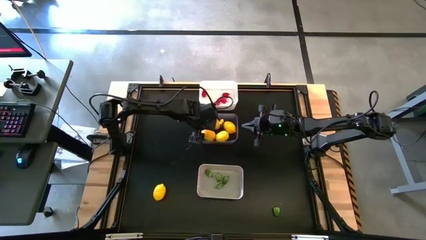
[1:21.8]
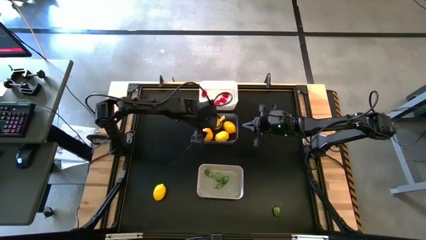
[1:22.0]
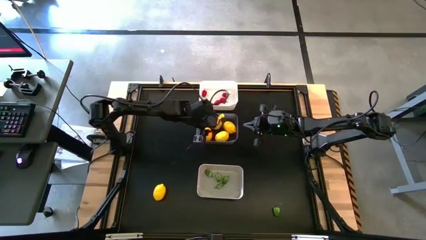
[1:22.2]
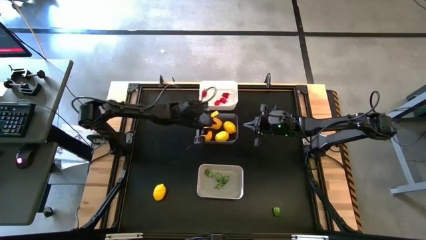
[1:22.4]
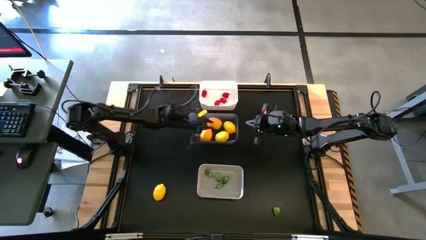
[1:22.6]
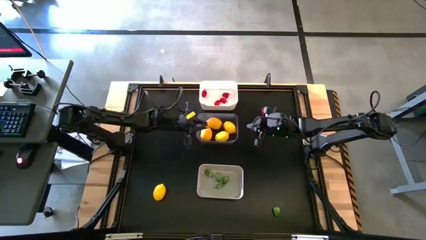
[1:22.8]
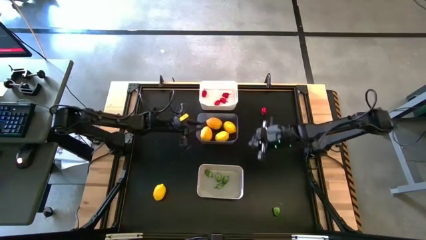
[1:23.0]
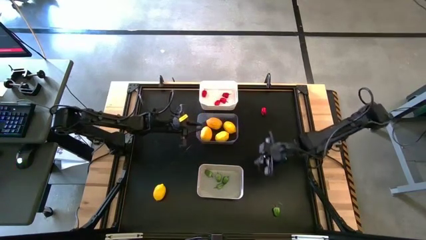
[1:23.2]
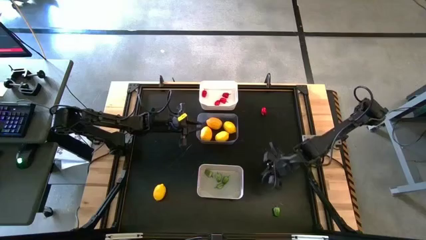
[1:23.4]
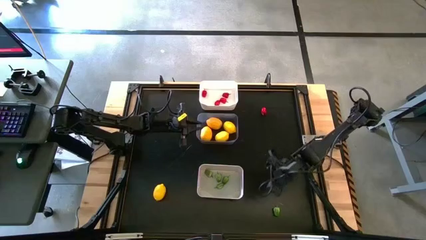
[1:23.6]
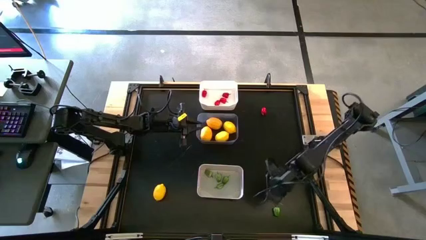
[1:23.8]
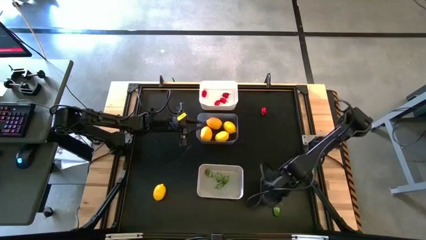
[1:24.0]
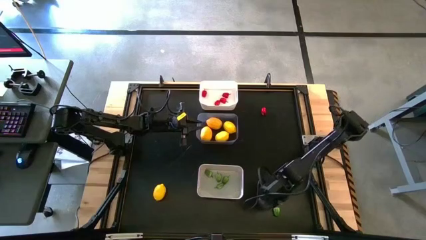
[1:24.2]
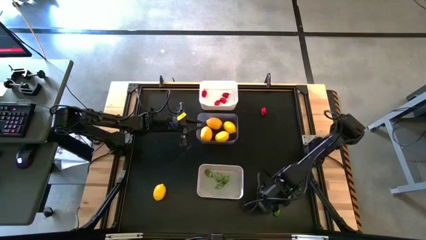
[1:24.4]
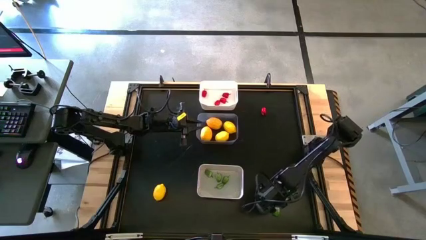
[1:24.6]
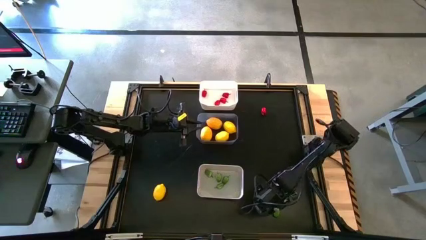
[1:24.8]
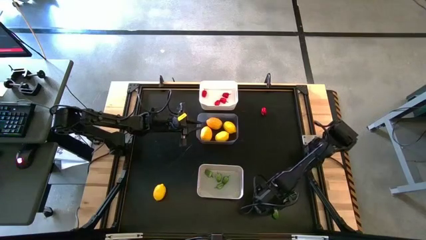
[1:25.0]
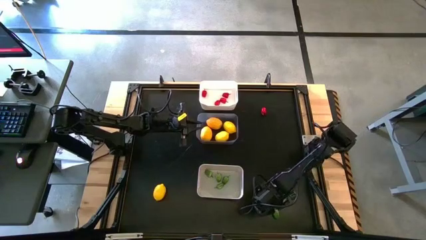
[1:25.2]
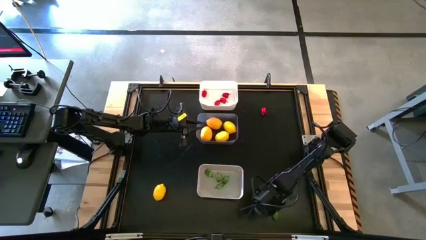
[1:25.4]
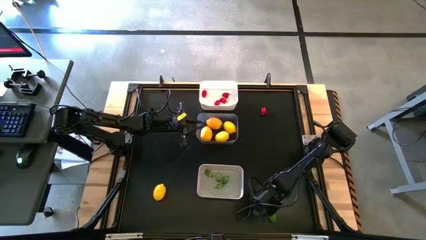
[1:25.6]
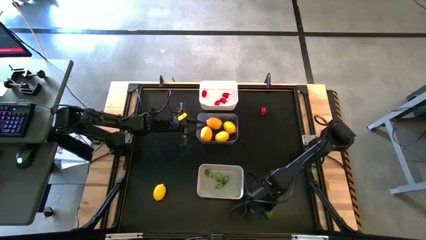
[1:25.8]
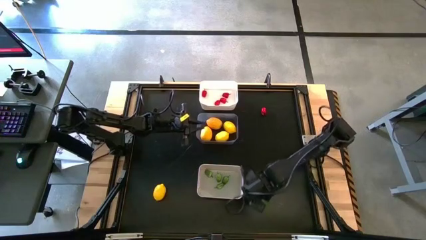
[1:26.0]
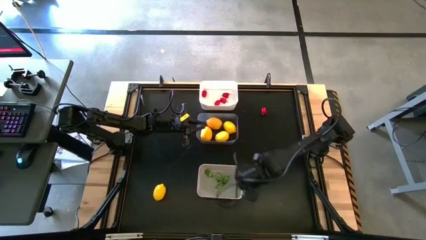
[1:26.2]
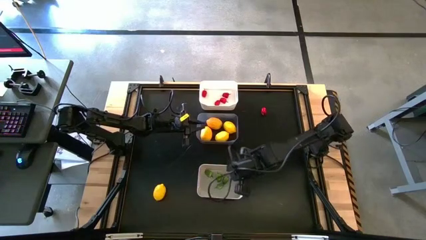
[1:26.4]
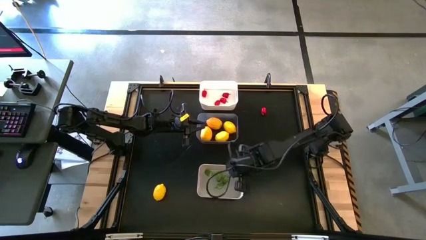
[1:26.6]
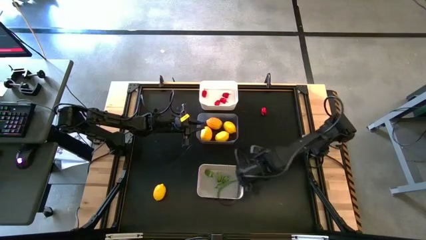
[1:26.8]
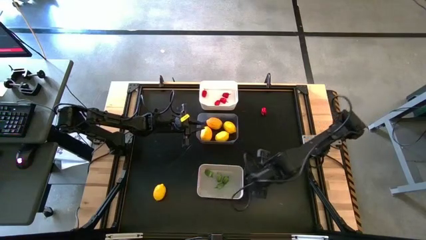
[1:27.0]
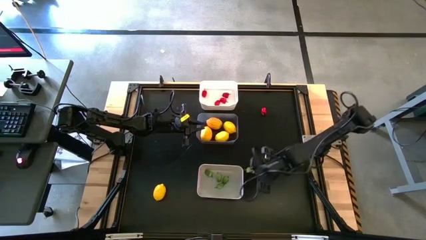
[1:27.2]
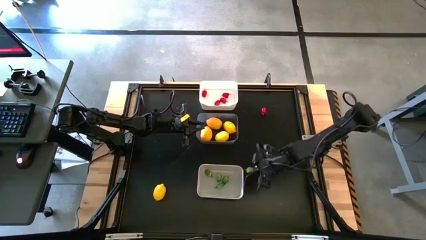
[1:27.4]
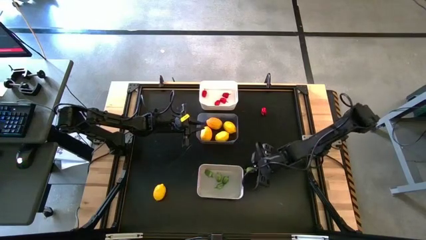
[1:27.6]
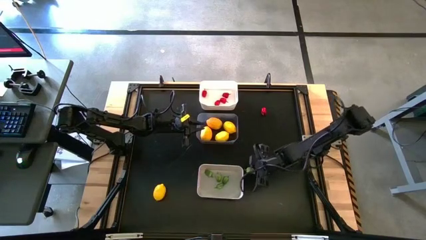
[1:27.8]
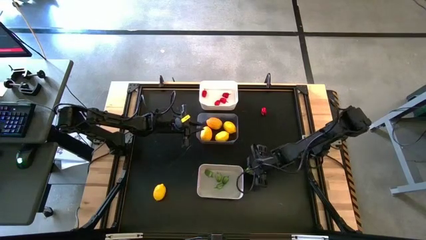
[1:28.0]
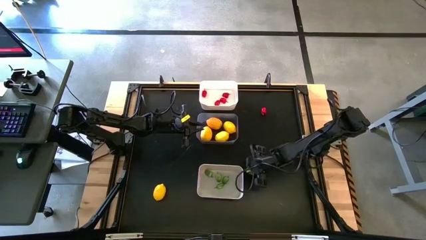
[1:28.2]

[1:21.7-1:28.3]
Task: Sort produce into baskets
Put the green chili pepper into the gray bin

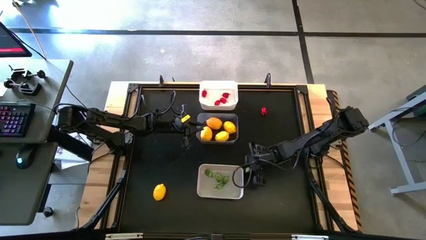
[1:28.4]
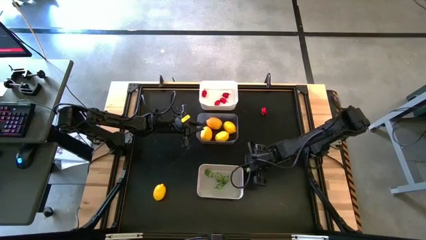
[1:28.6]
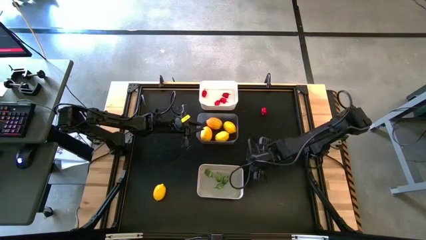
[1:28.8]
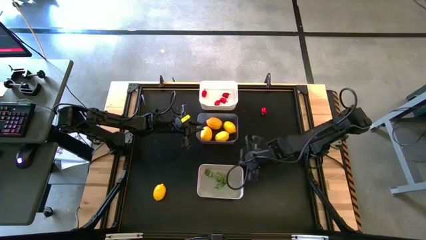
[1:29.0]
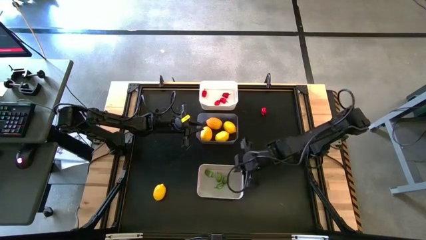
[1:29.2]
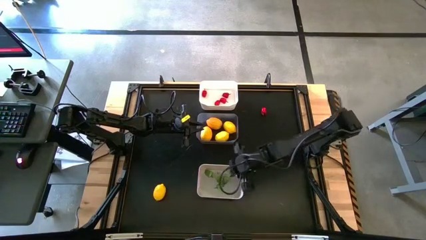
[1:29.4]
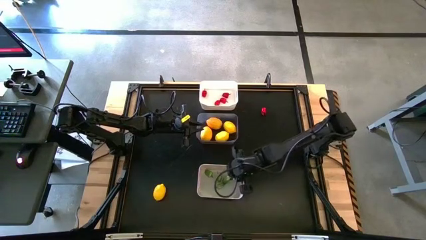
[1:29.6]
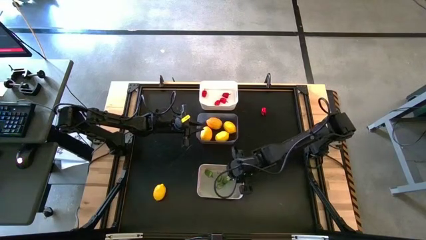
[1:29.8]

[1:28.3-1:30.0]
Put the green chili pepper into the gray bin

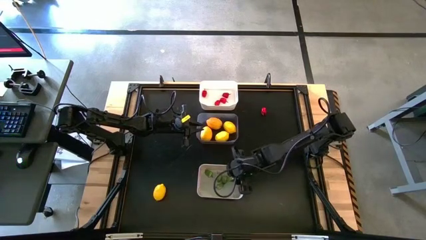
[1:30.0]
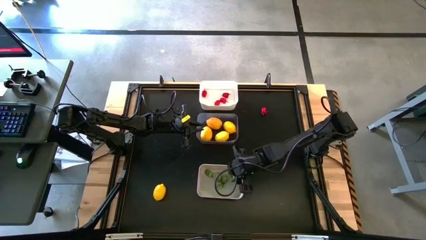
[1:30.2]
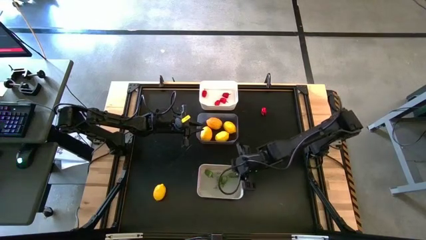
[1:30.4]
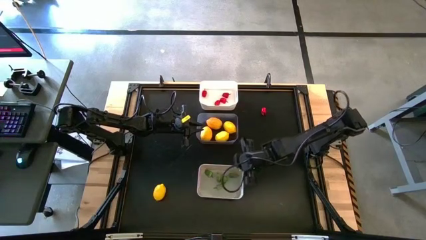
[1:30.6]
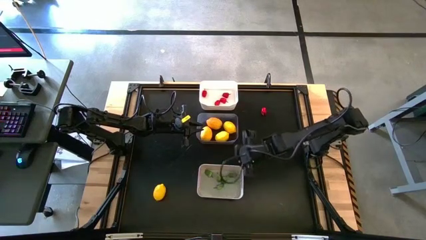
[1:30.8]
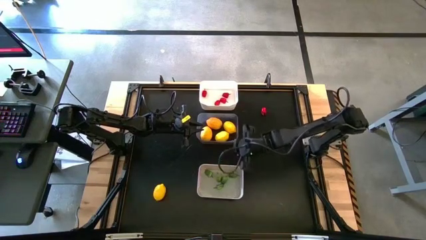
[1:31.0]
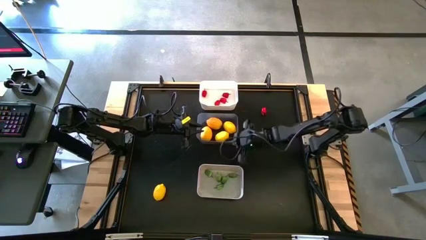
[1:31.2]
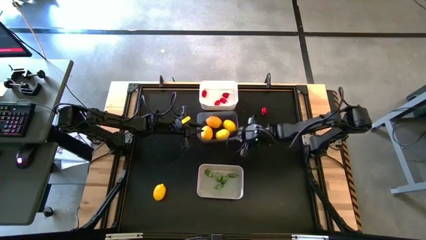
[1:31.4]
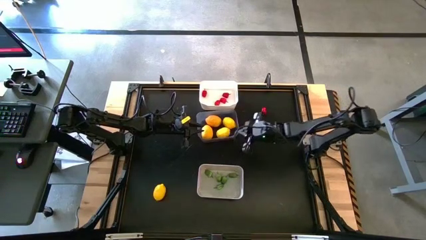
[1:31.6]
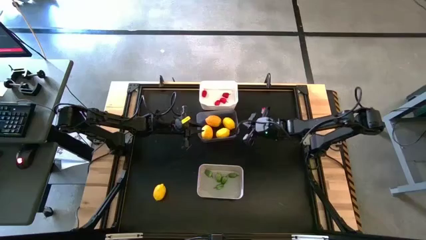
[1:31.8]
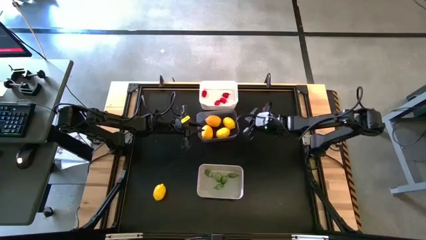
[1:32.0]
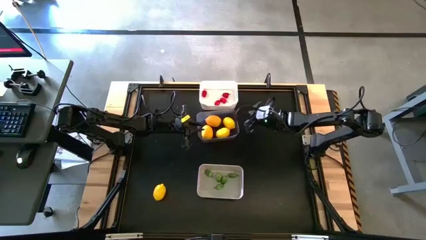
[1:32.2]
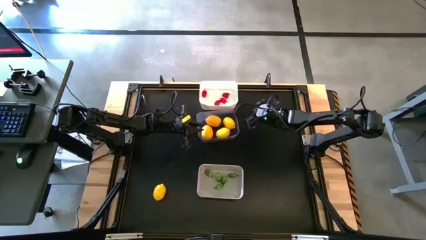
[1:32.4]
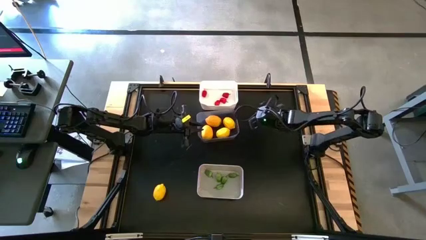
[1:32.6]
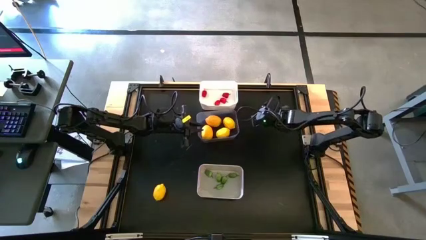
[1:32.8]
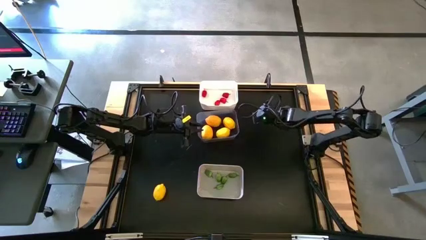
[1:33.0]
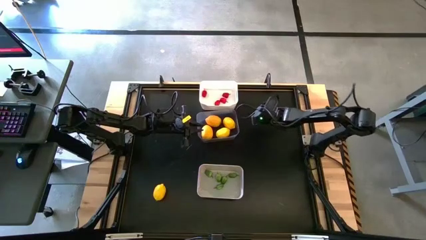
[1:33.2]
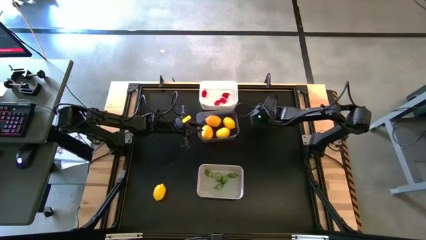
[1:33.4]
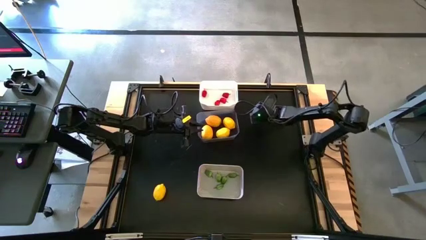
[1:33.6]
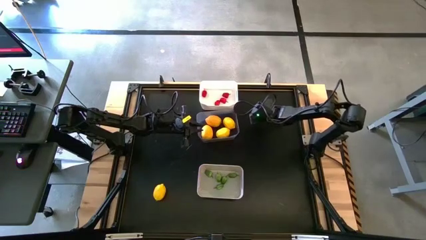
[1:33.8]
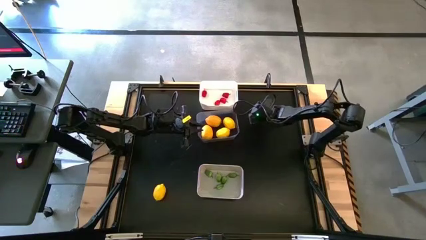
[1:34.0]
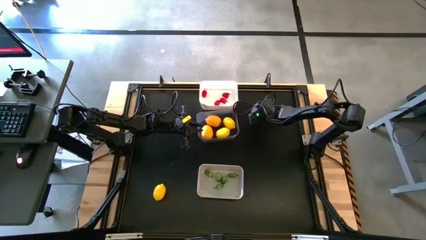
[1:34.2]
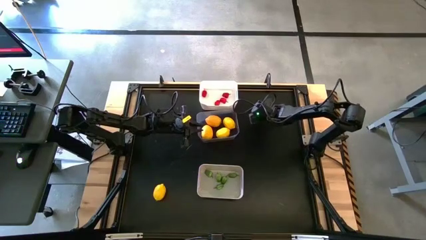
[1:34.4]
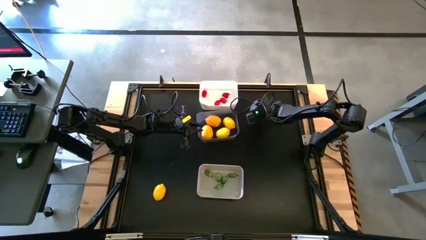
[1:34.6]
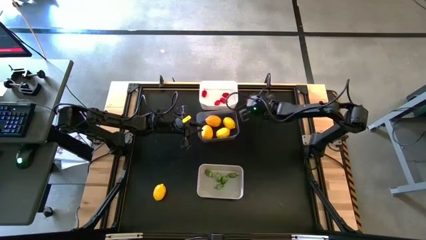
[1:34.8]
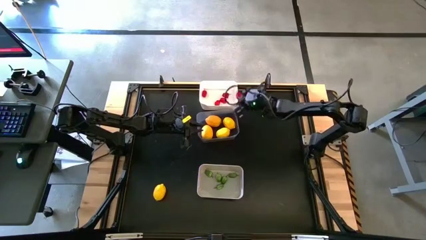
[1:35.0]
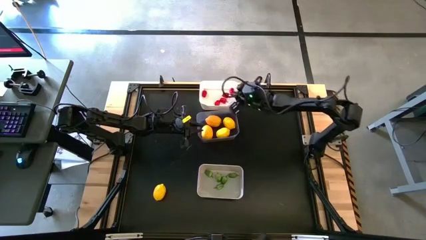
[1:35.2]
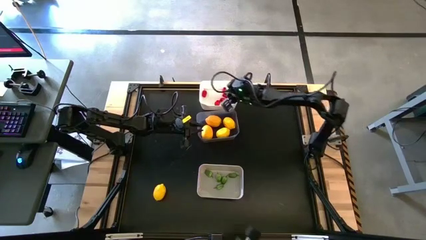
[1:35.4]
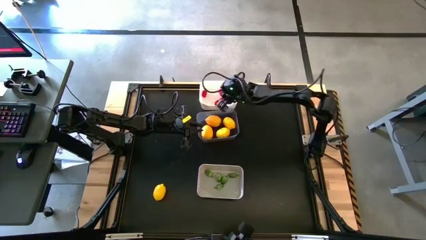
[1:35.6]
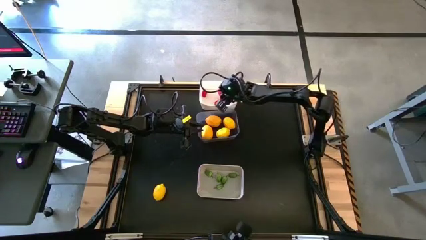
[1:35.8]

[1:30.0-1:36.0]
Put the red chili pepper into the white bin

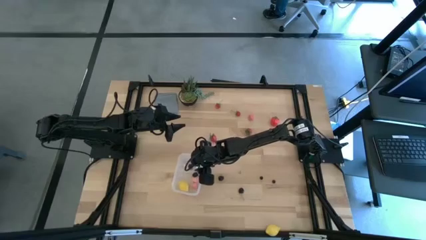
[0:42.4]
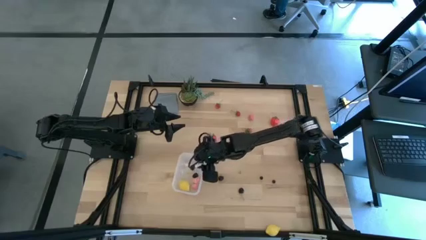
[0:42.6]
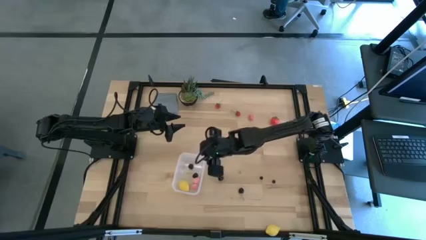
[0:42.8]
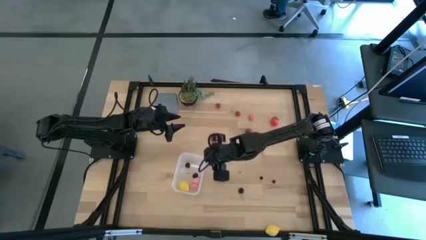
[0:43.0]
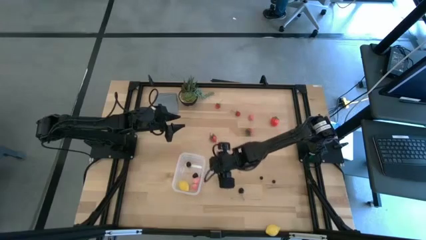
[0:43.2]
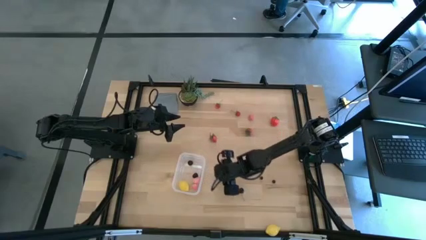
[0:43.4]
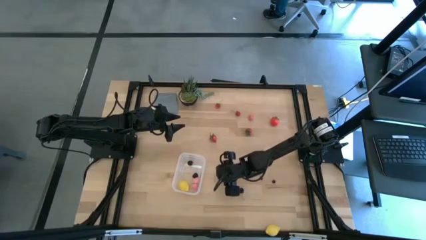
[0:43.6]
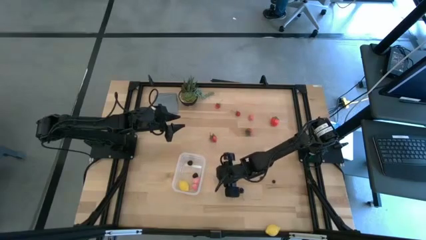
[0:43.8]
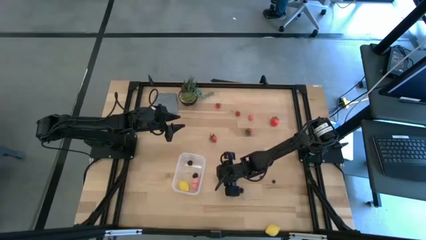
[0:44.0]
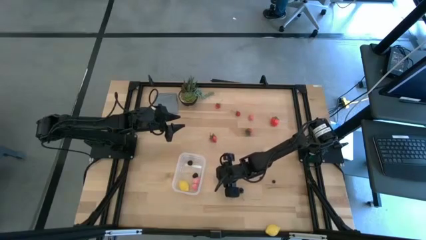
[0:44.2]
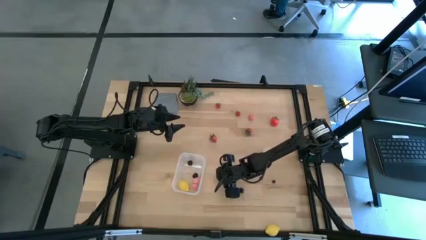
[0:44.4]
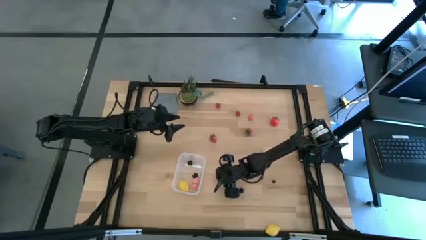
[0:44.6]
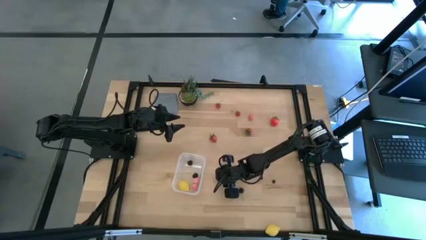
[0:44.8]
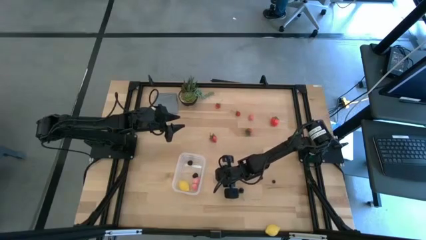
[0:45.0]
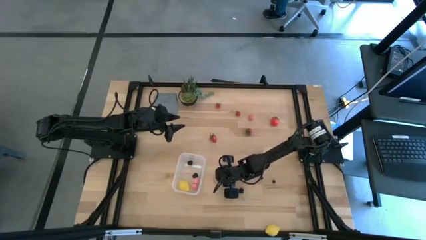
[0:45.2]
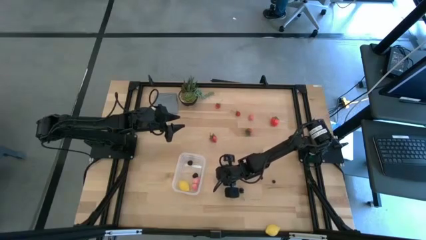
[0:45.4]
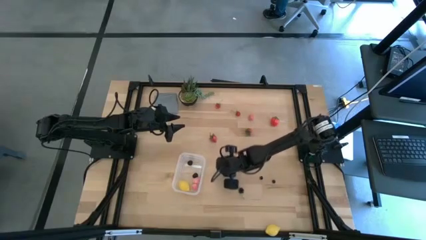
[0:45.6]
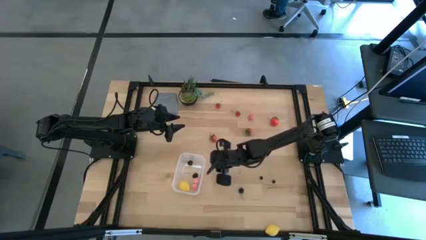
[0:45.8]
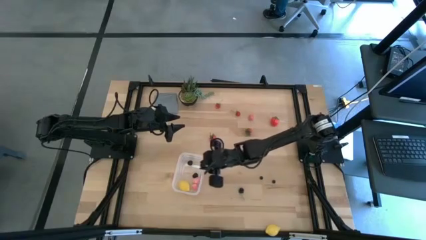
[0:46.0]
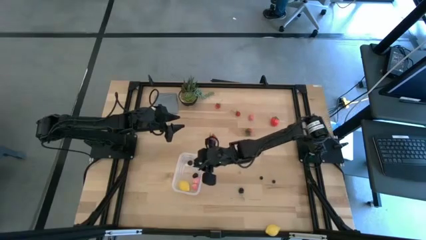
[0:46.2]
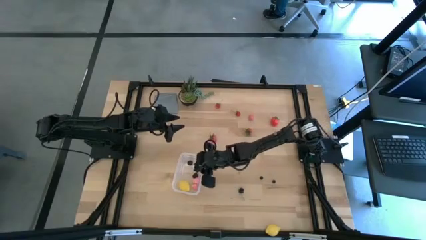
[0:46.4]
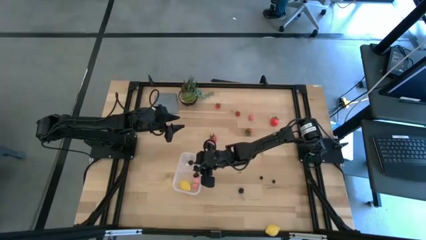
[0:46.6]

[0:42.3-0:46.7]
Task: Pick and placing Produce into tupperware
Put the blackberry into the transparent bin
